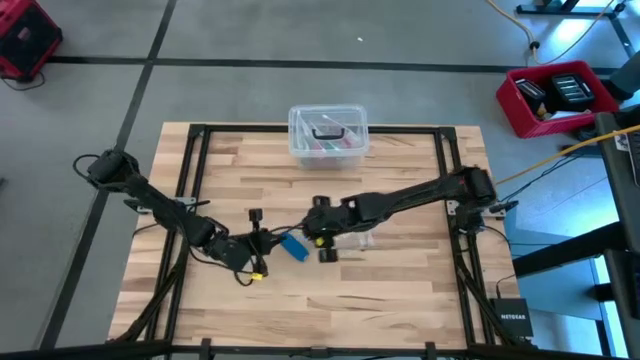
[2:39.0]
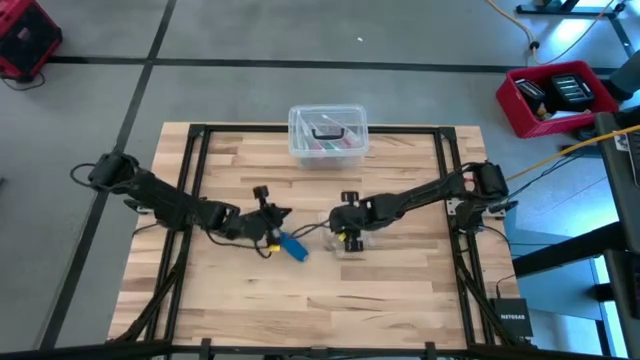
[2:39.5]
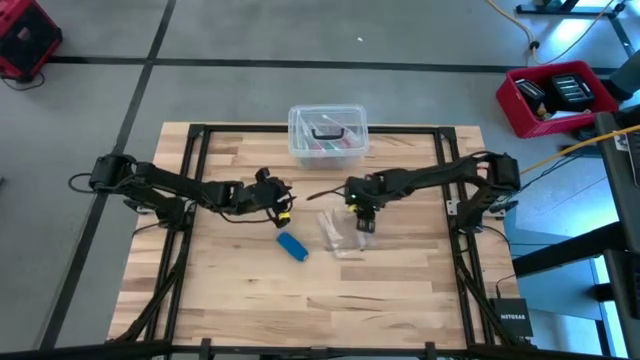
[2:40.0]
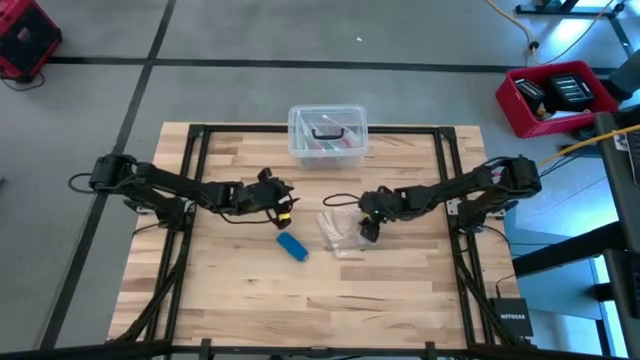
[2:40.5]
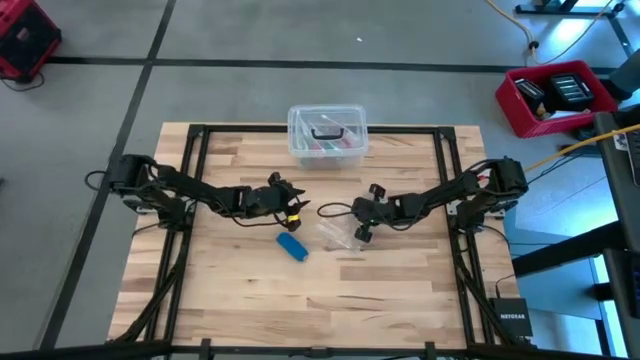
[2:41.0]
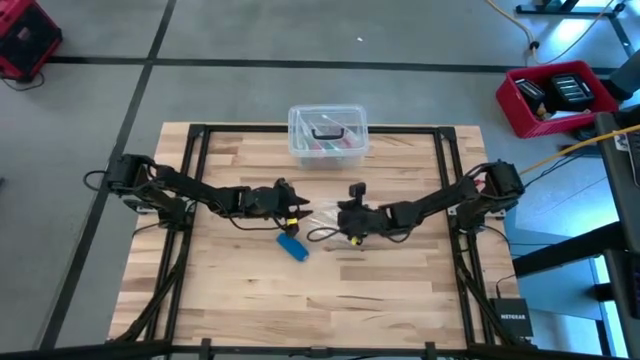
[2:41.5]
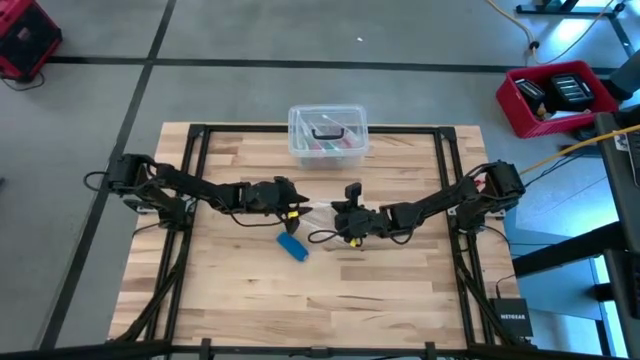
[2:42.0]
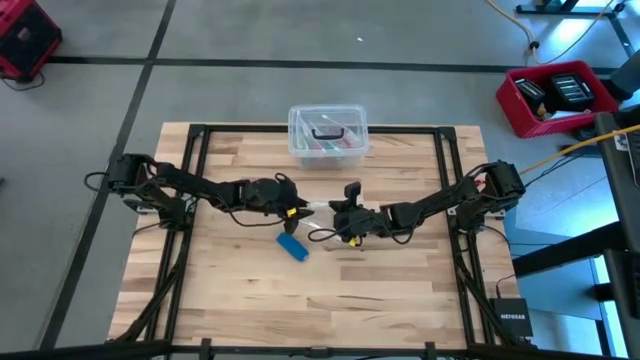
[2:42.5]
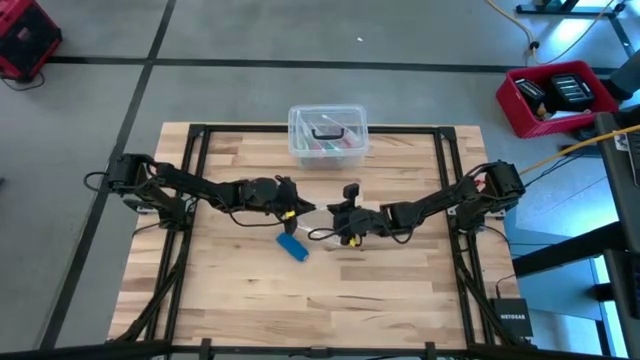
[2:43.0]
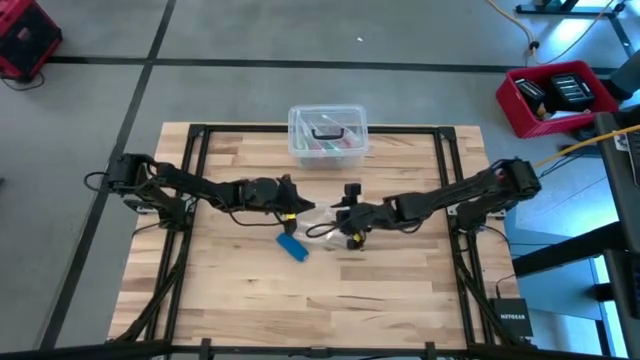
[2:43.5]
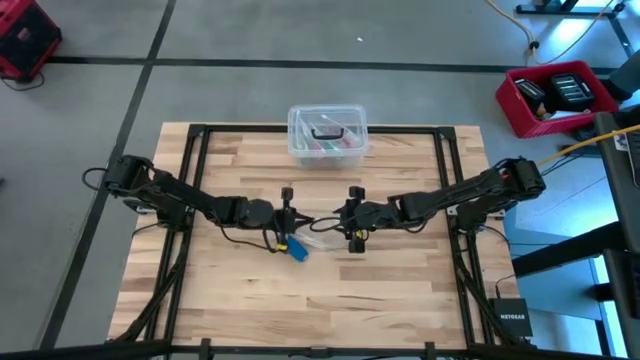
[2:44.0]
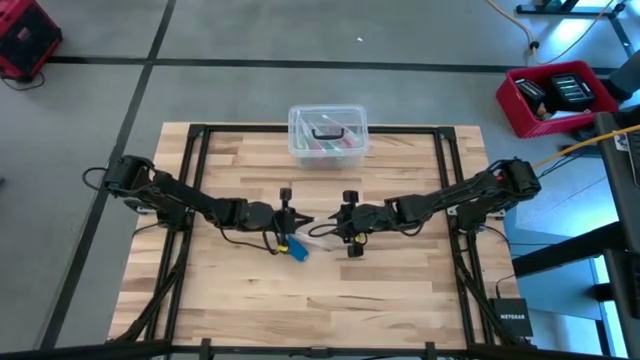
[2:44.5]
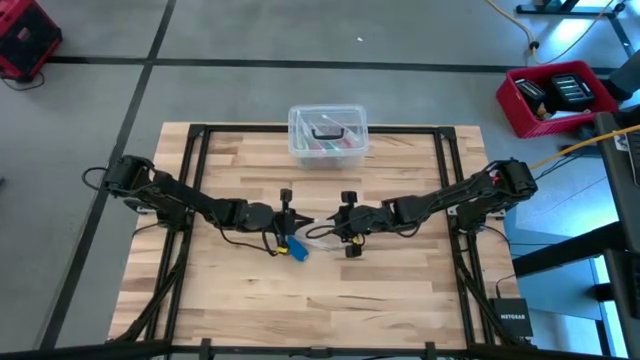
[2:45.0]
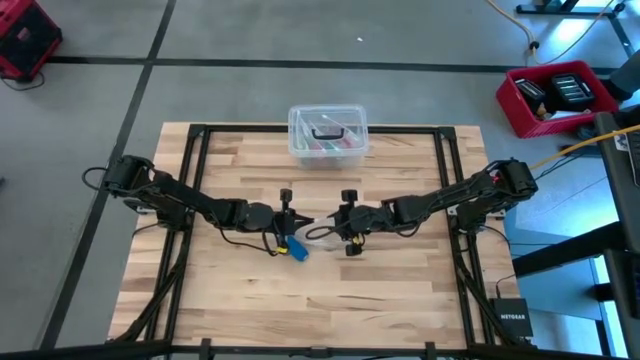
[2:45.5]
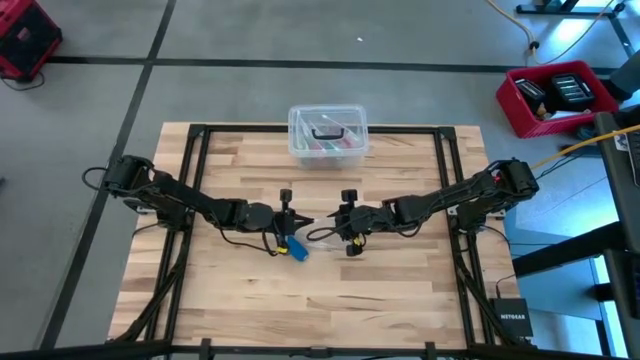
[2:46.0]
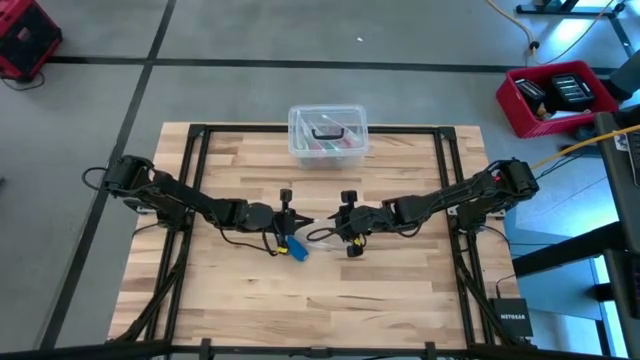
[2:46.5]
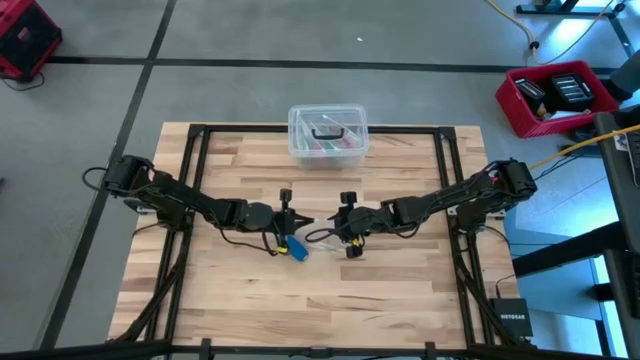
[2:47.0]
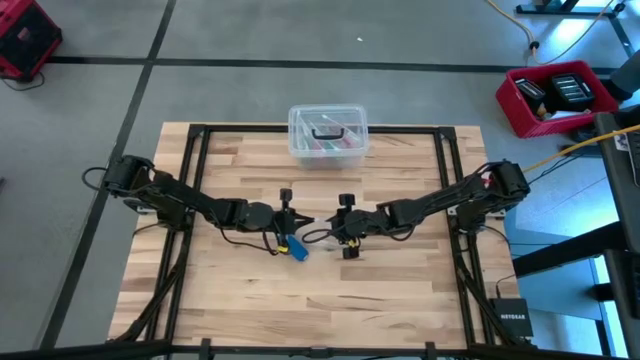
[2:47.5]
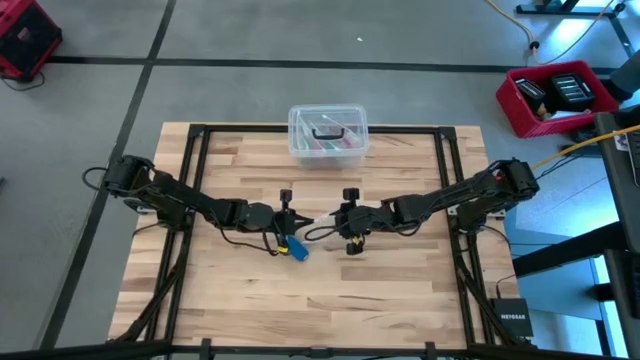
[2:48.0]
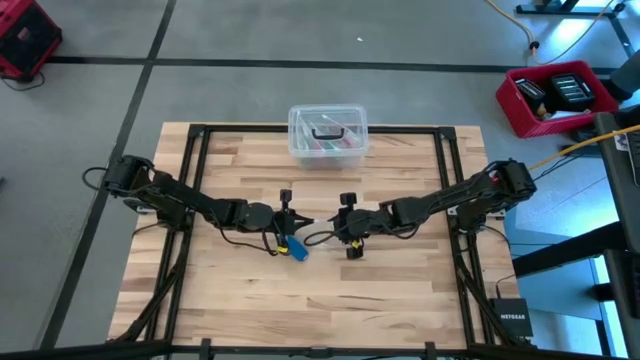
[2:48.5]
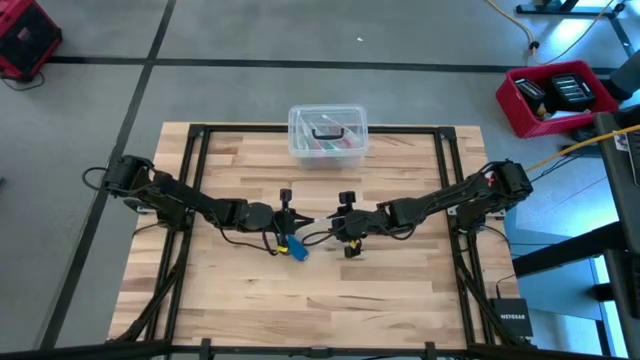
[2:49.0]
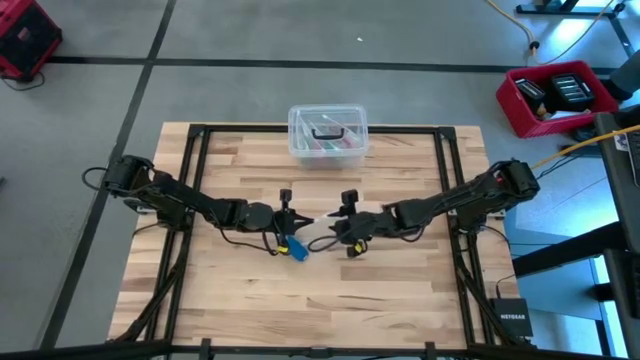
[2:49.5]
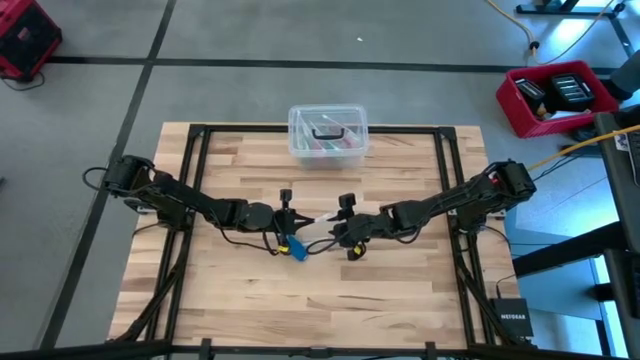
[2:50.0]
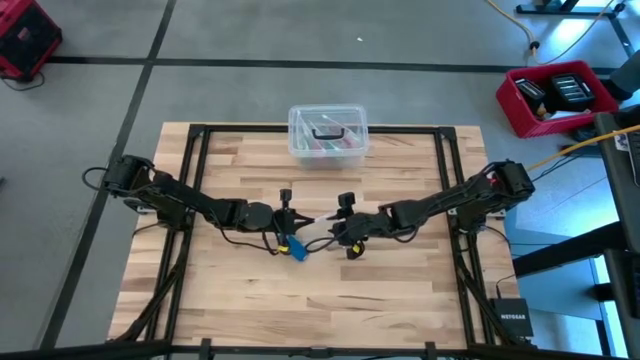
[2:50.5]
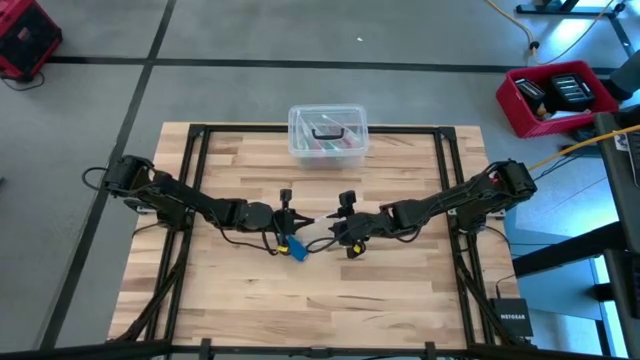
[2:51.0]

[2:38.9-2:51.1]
Task: Roll bandage
Open the transparent zip bag

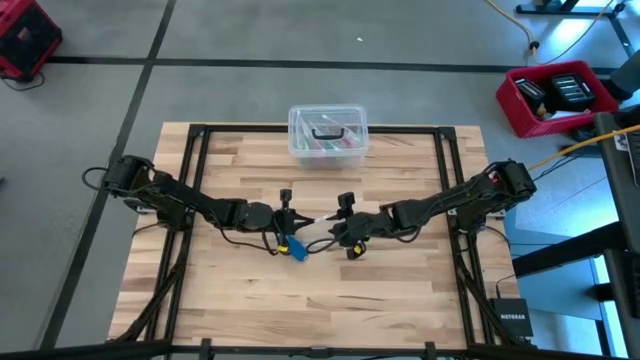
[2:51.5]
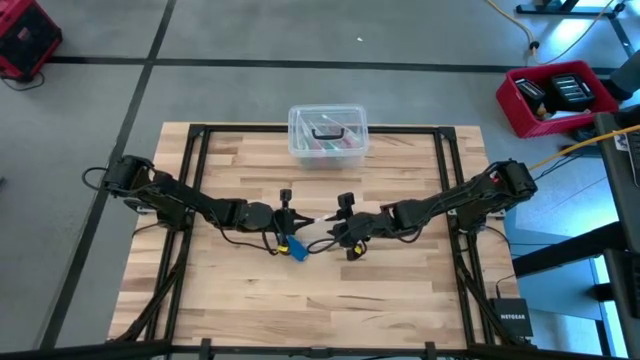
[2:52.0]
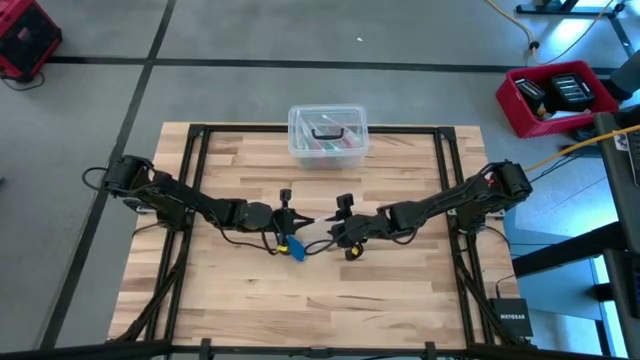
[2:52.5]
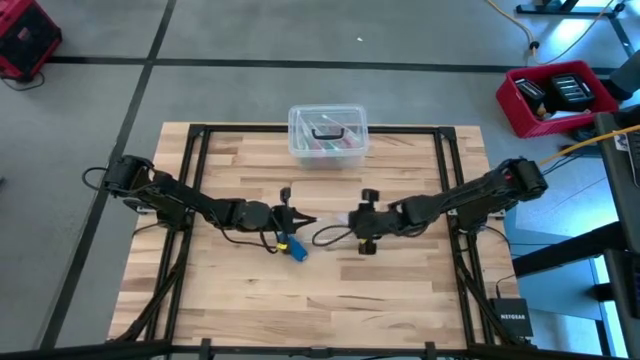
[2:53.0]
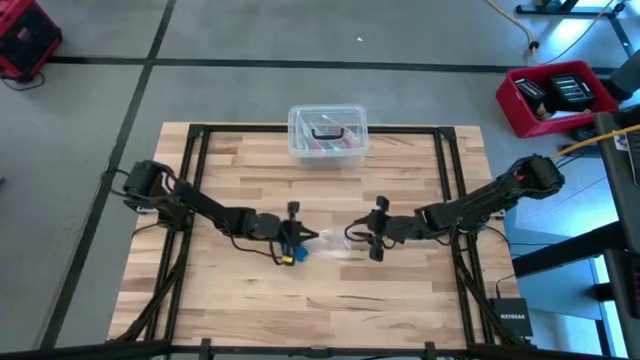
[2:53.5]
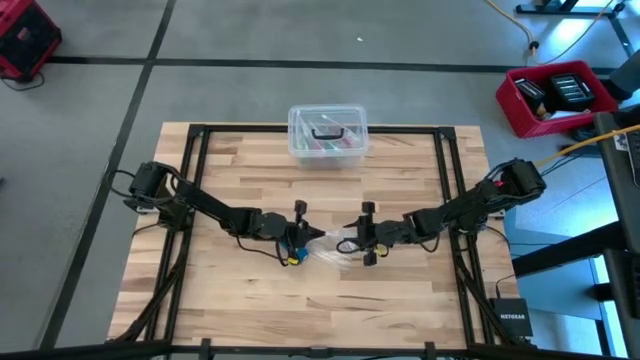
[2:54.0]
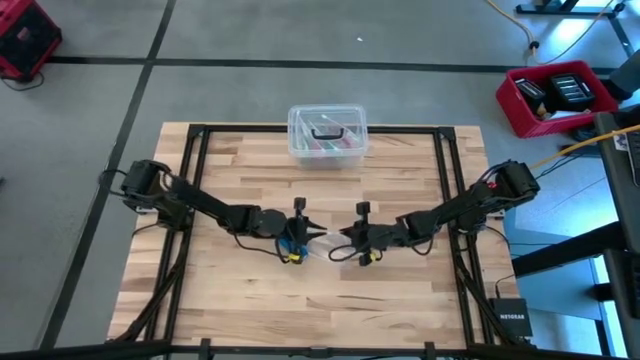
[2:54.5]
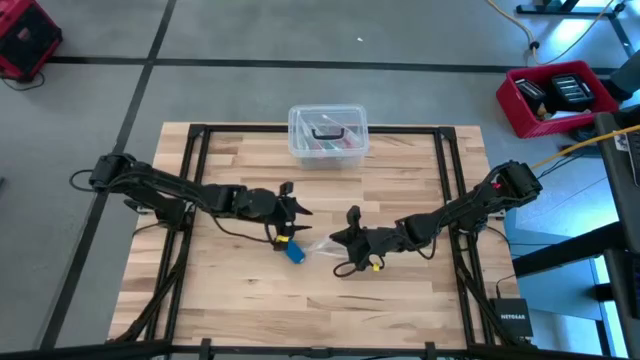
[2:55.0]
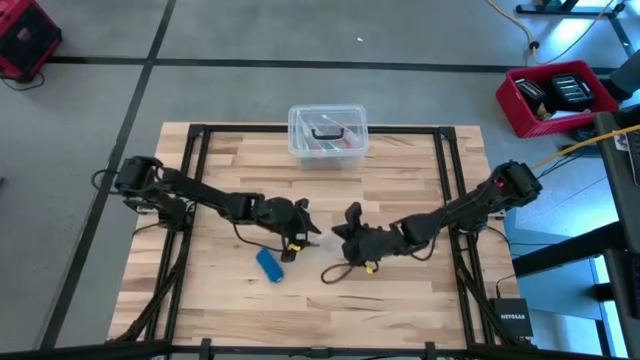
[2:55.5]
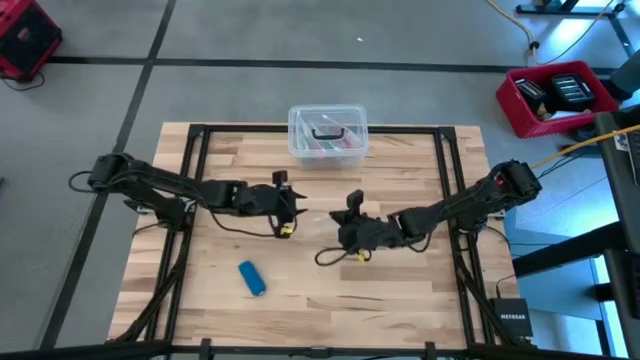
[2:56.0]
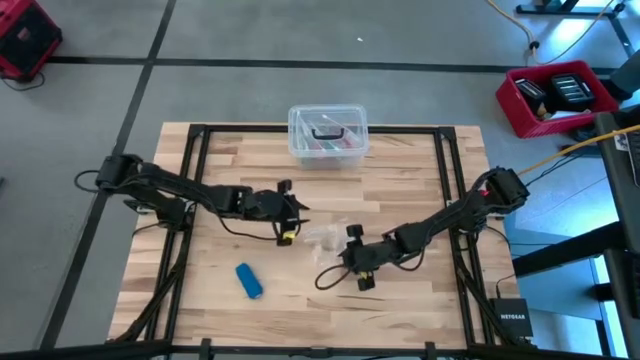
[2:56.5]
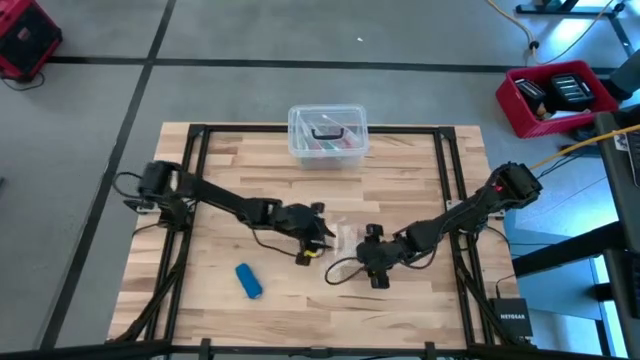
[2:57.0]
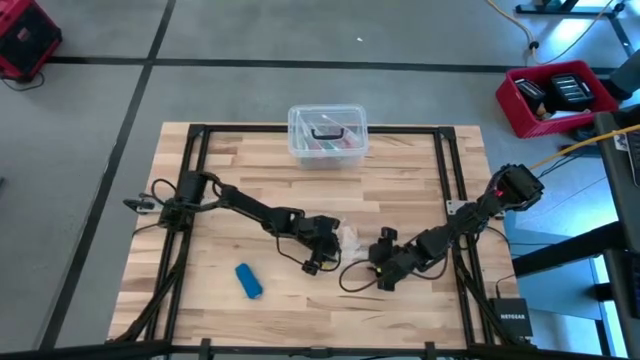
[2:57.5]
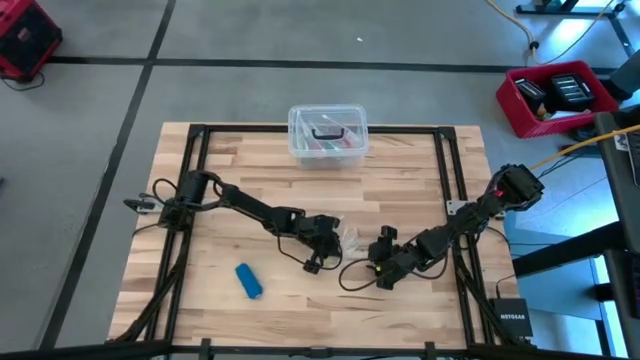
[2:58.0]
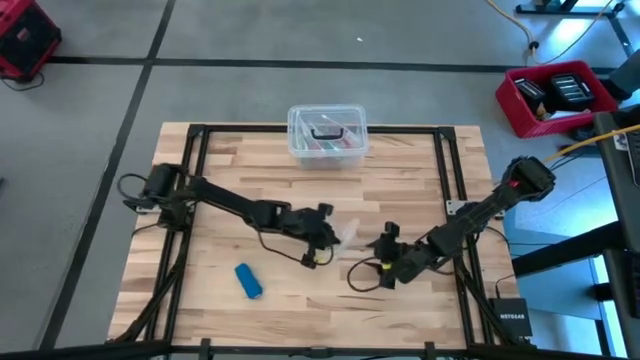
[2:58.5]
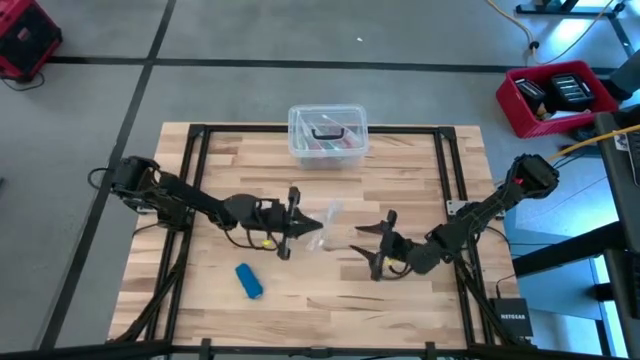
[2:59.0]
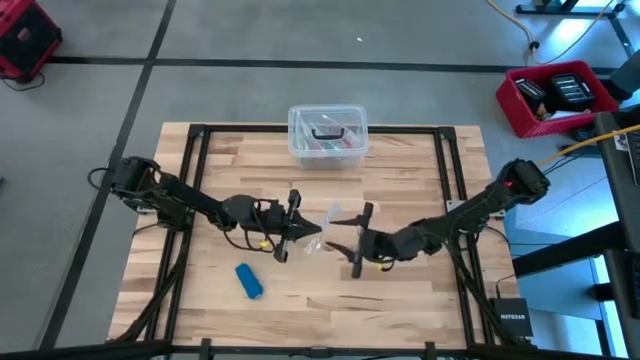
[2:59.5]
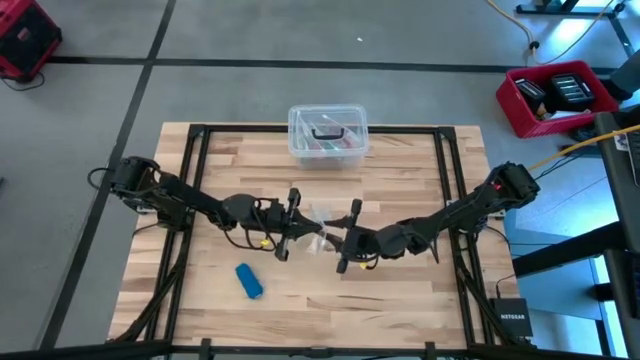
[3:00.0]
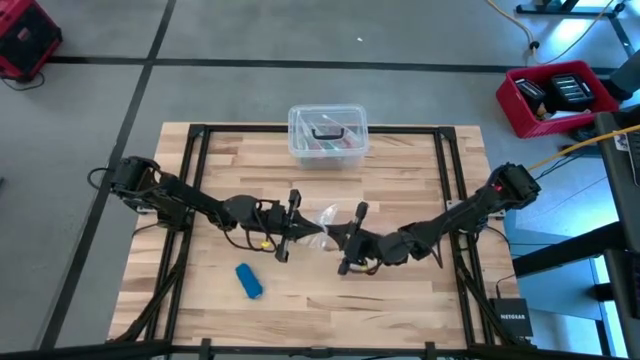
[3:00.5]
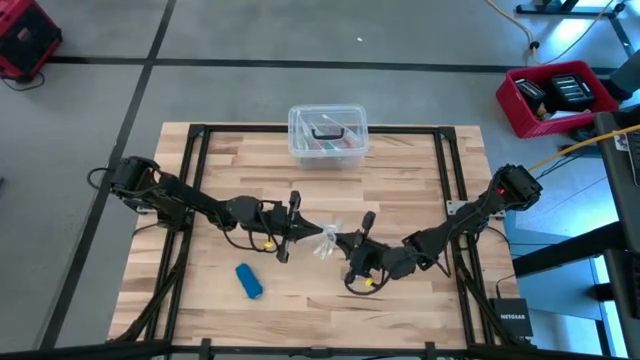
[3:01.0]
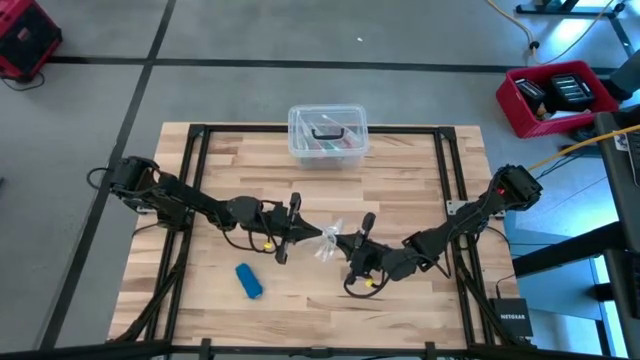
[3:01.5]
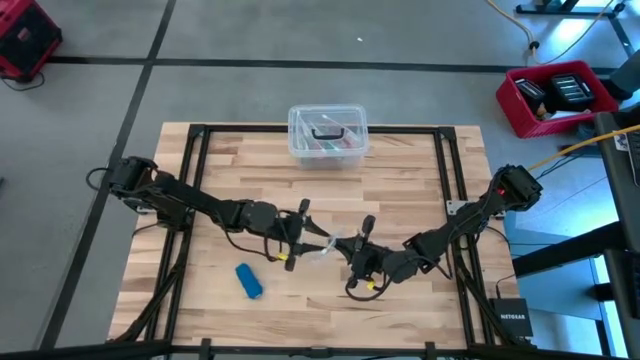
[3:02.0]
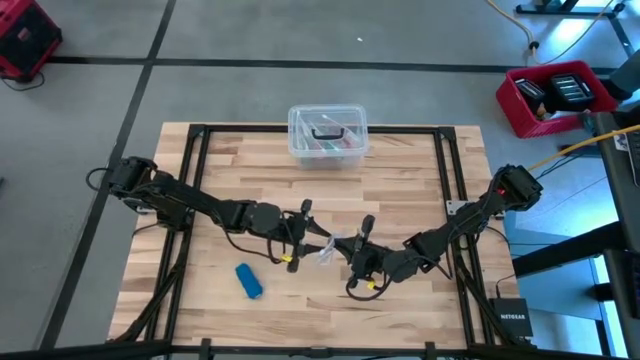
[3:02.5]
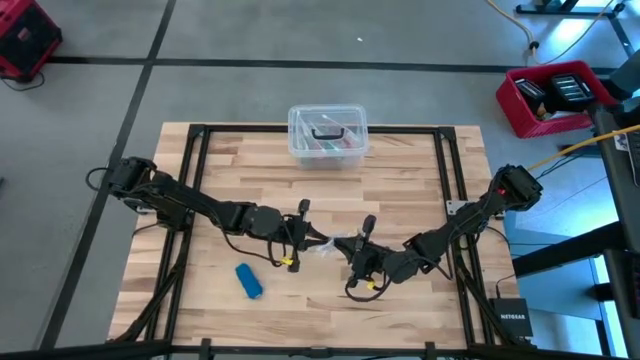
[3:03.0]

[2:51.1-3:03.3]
Open the transparent zip bag
